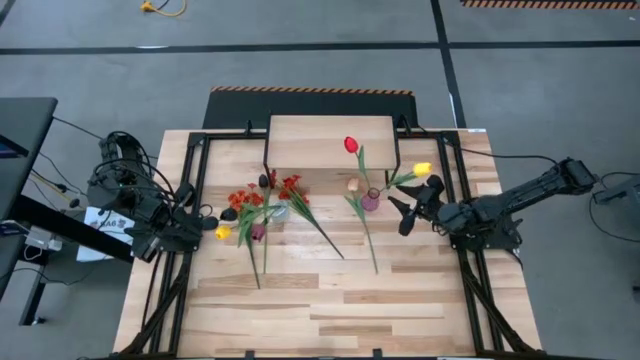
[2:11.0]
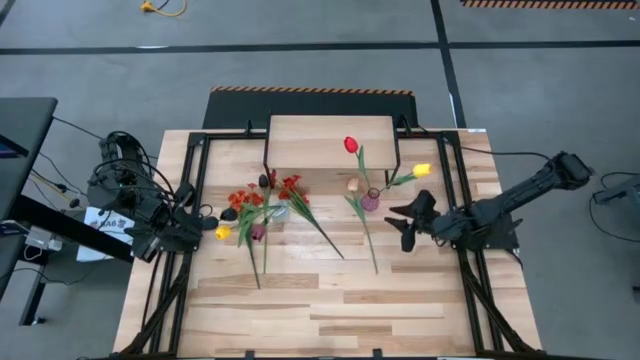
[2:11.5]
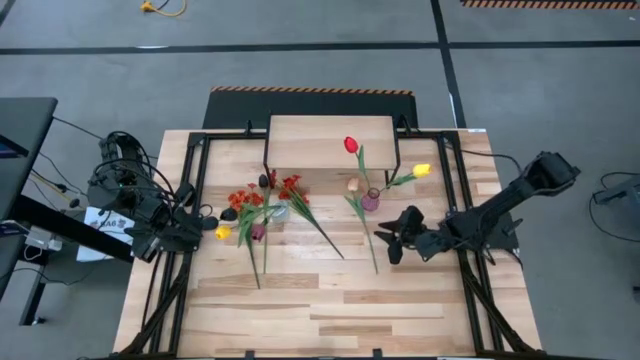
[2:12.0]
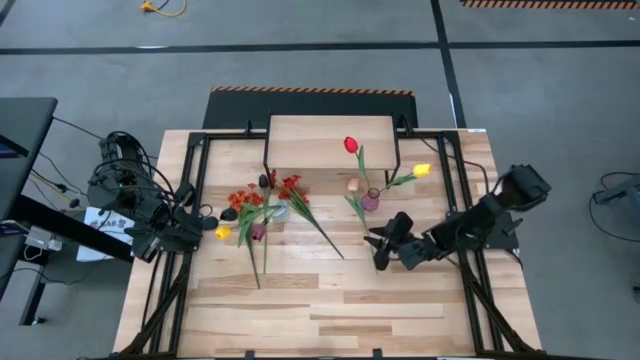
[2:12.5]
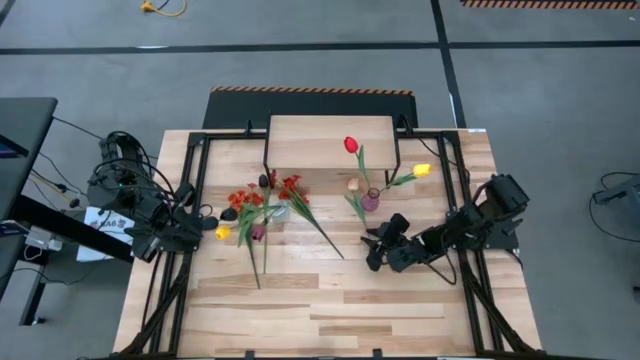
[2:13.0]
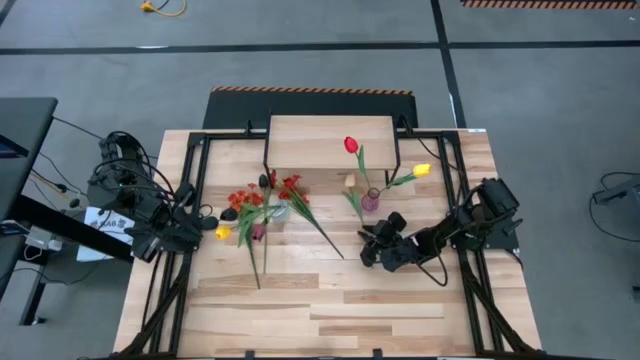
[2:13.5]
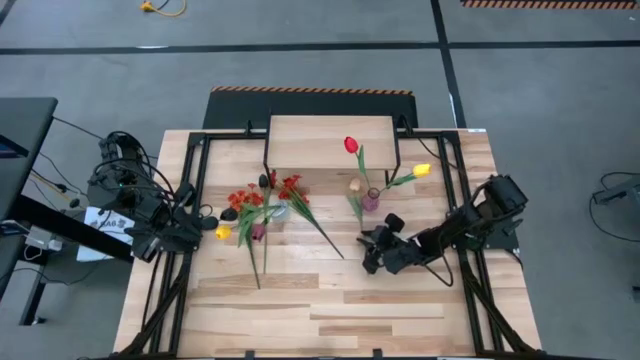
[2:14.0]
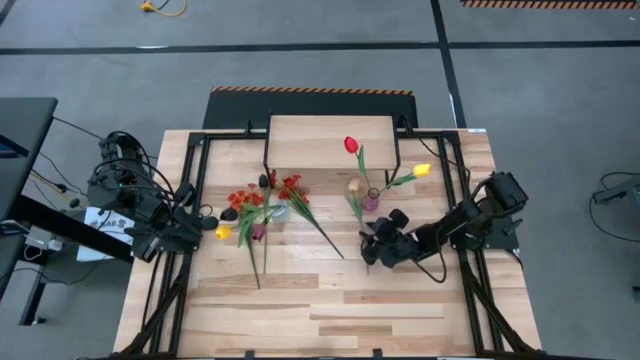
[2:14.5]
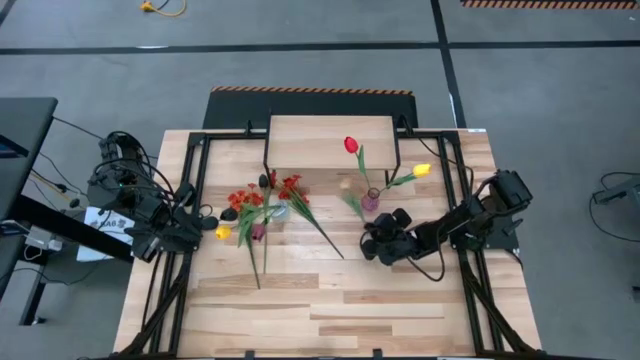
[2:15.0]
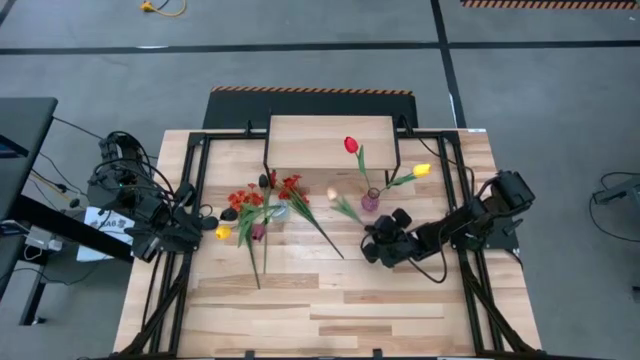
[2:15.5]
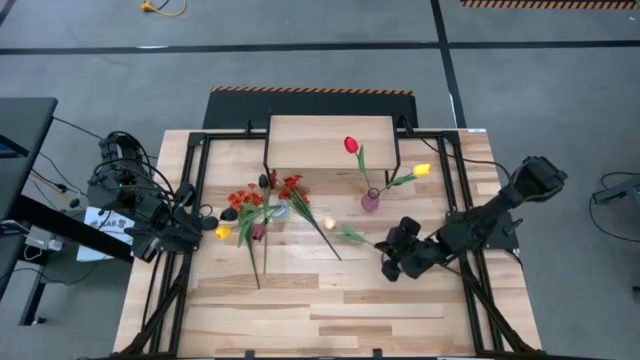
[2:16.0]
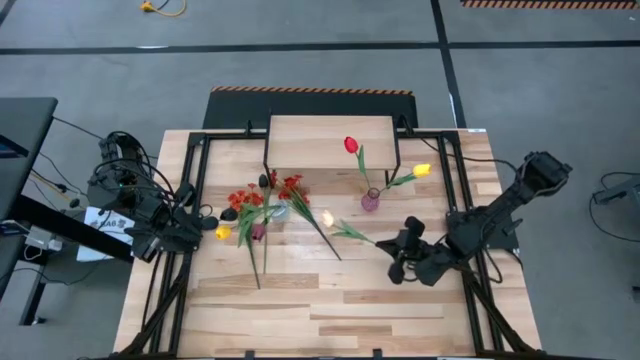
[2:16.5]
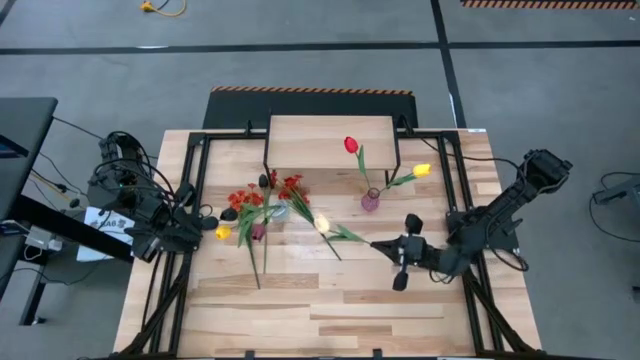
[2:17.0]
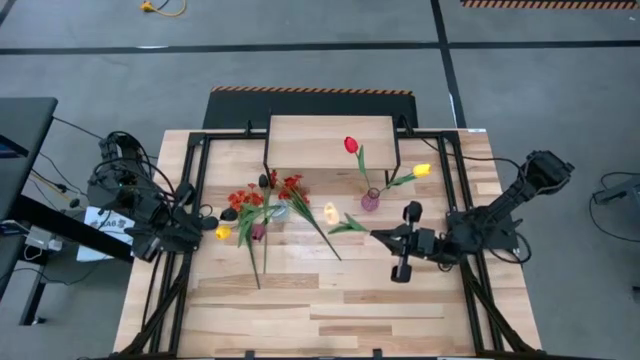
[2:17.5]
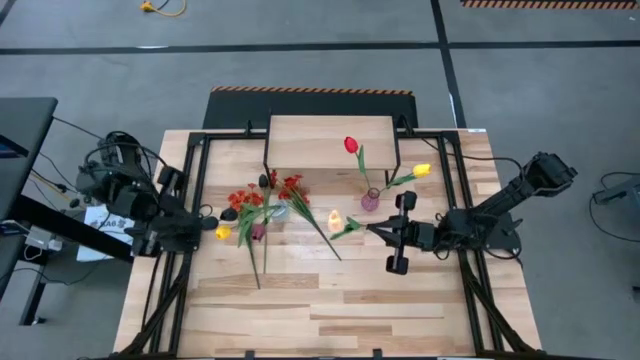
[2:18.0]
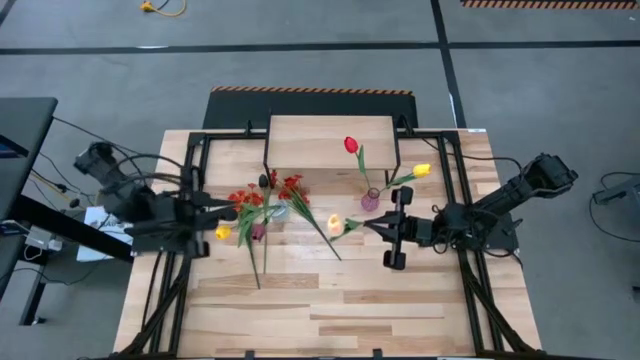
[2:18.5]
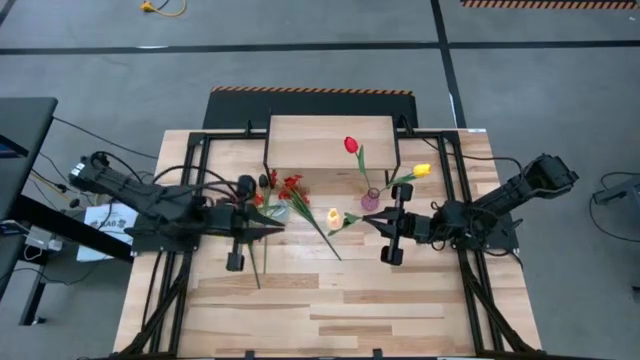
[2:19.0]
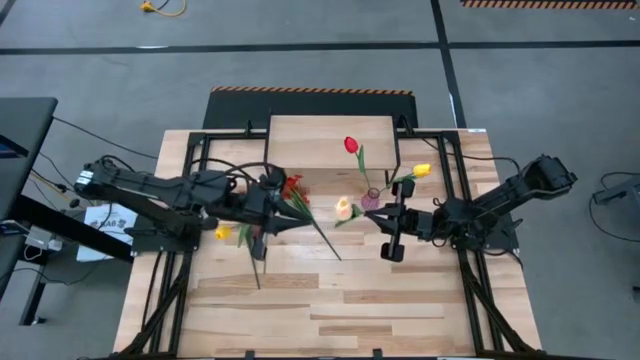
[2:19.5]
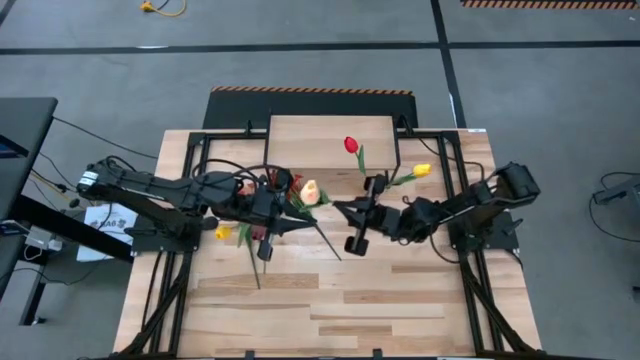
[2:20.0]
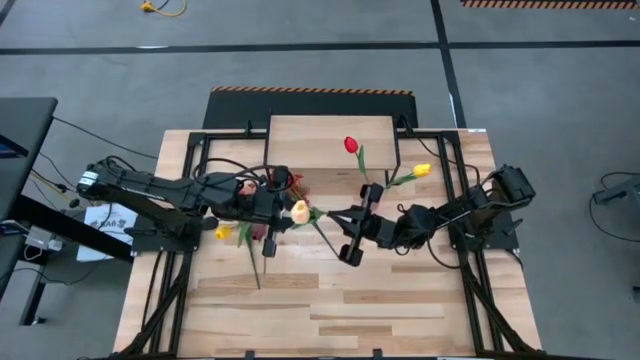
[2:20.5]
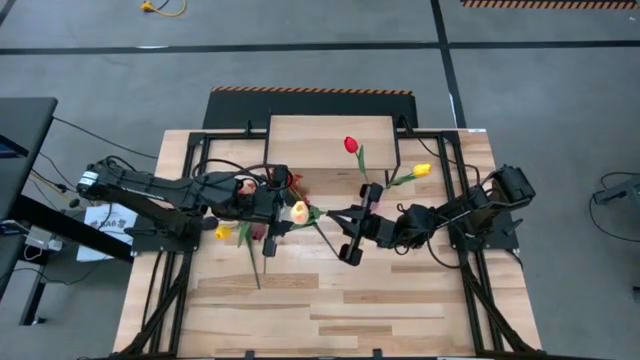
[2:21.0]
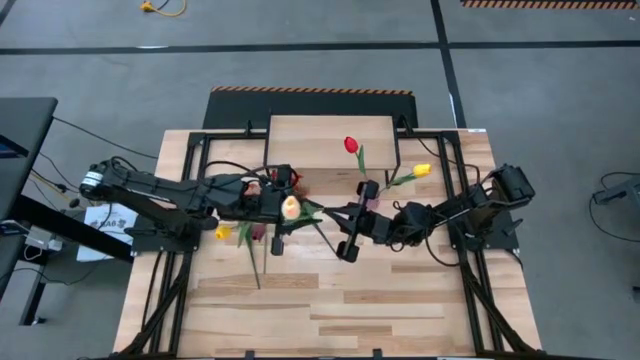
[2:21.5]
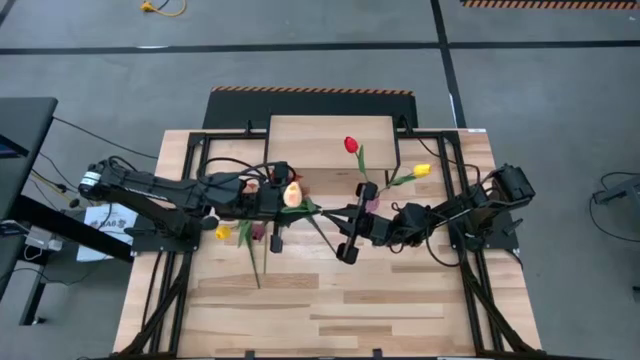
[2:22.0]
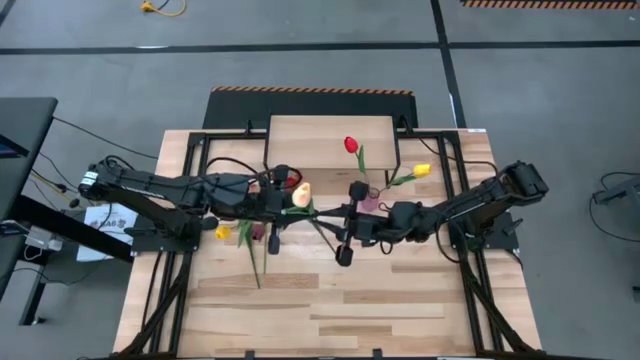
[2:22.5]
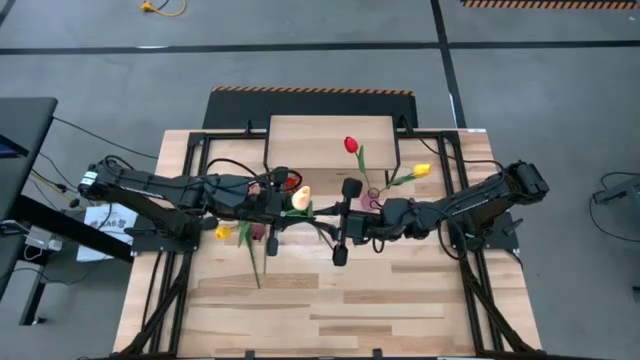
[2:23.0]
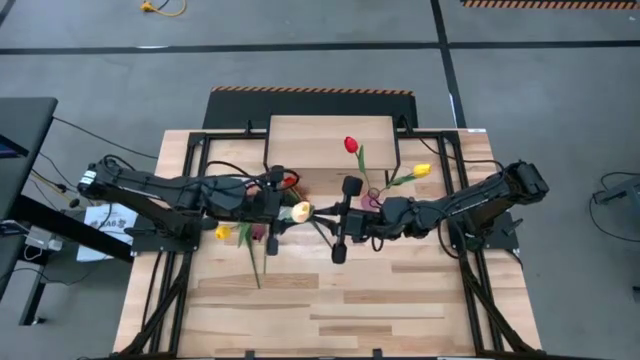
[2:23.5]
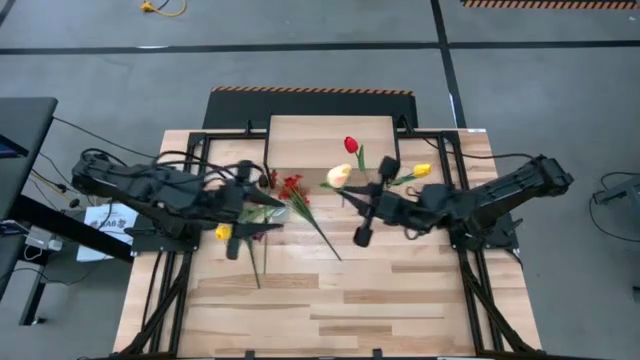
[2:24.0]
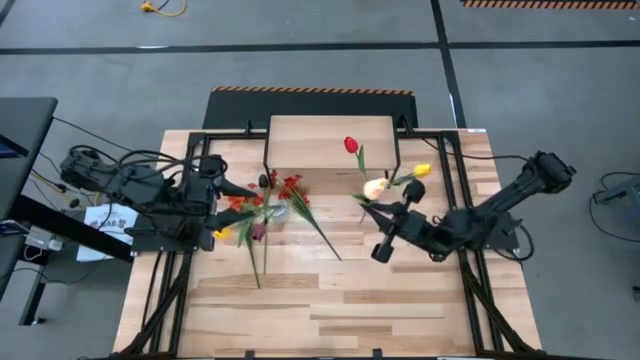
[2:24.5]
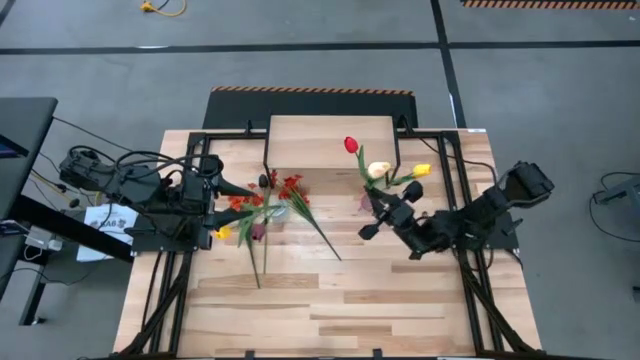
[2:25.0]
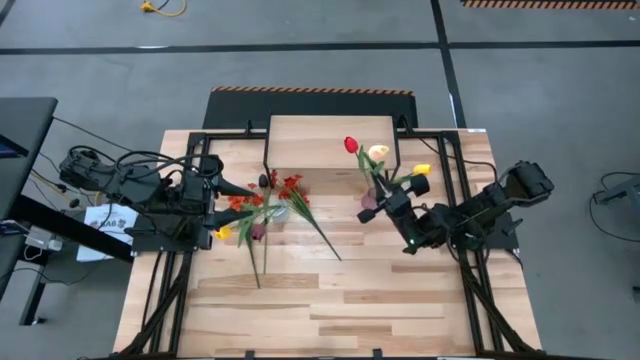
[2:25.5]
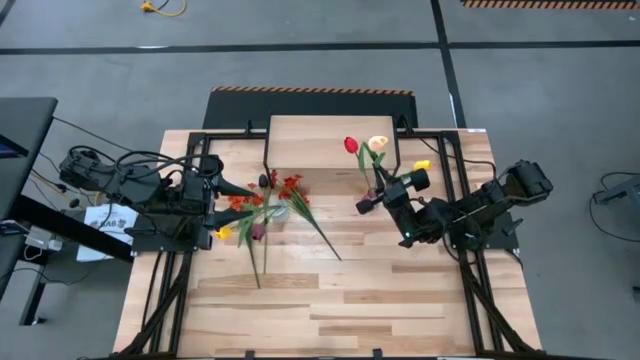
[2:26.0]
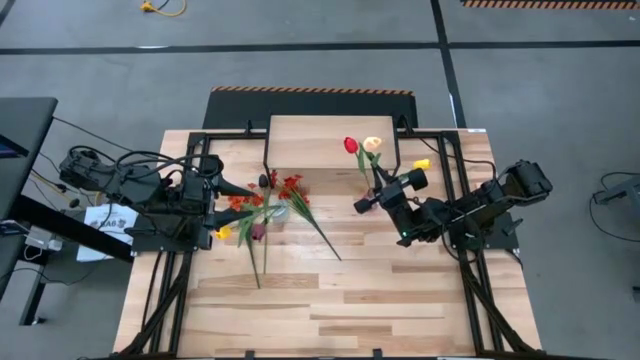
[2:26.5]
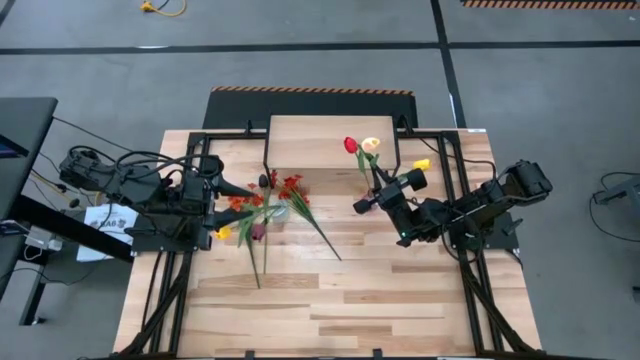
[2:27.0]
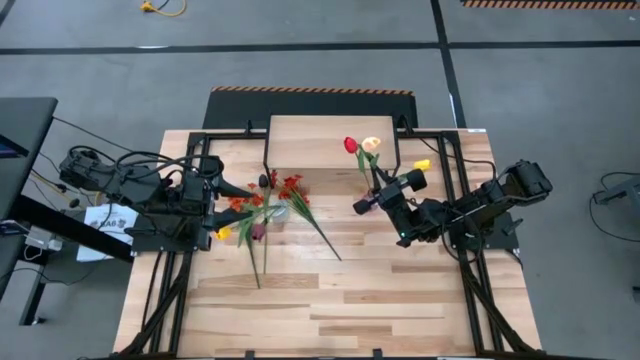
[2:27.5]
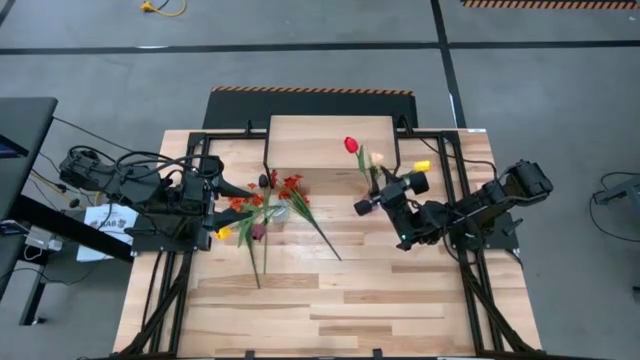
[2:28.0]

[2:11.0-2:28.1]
Task: Pick and place flowers into a vace then onto a shelf
Put the white flower into the purple vase

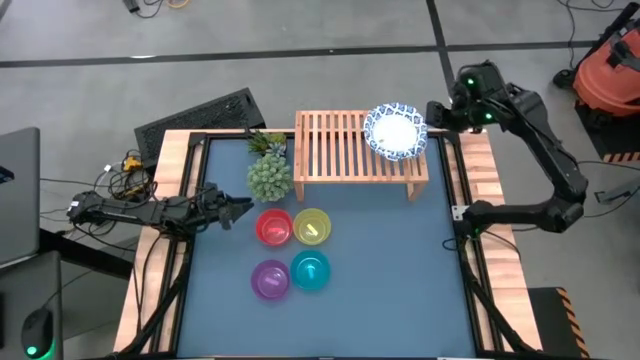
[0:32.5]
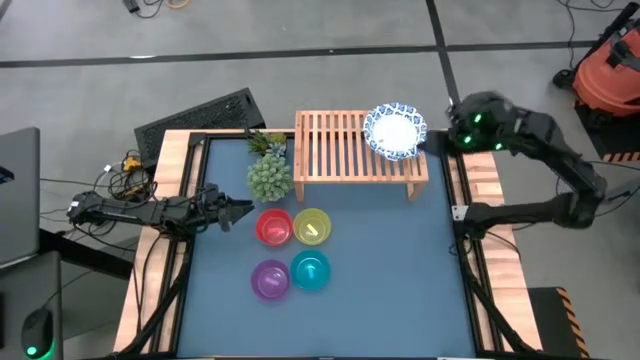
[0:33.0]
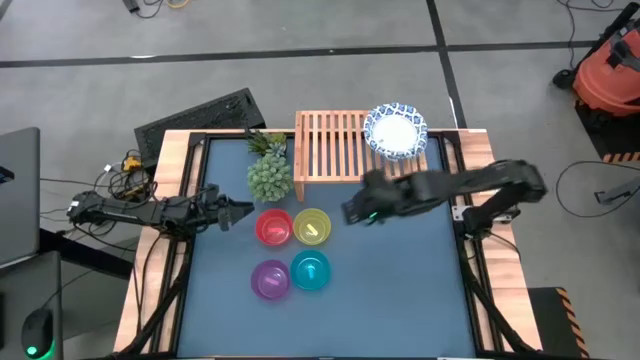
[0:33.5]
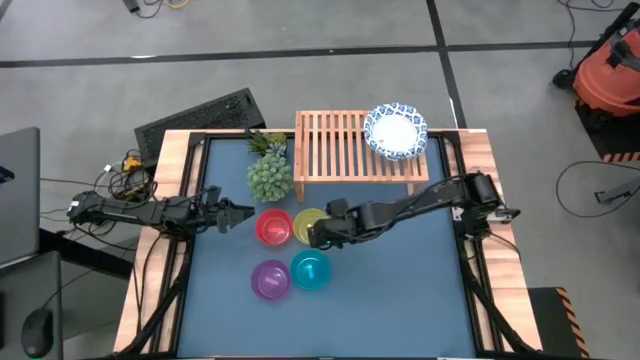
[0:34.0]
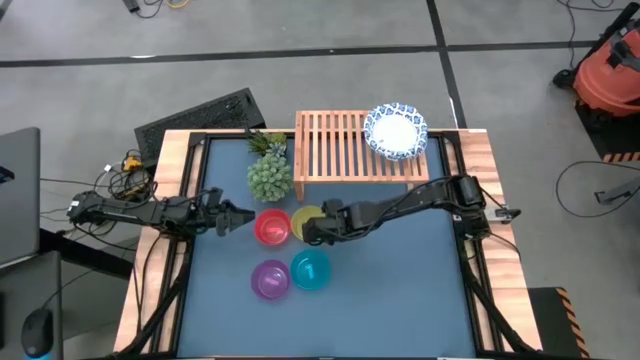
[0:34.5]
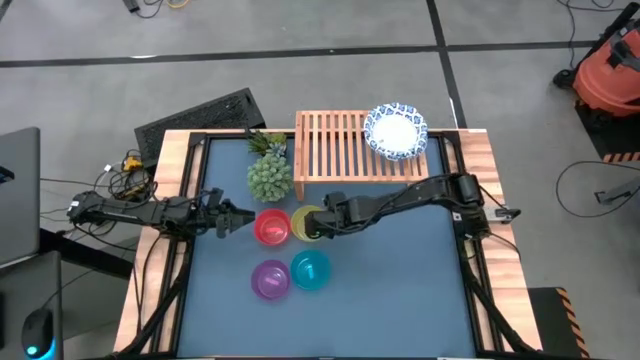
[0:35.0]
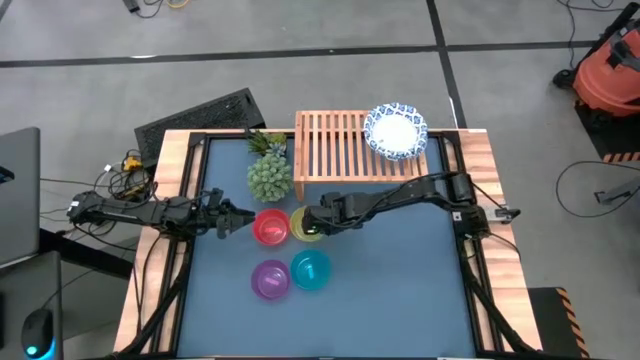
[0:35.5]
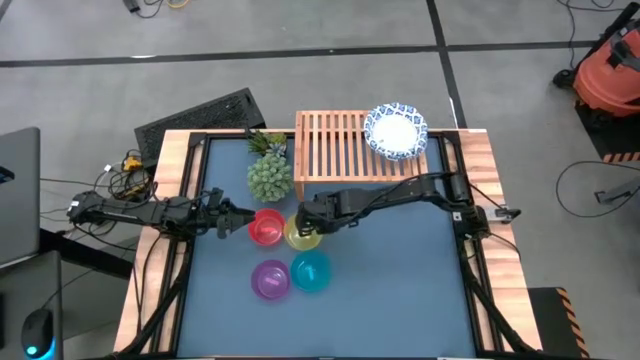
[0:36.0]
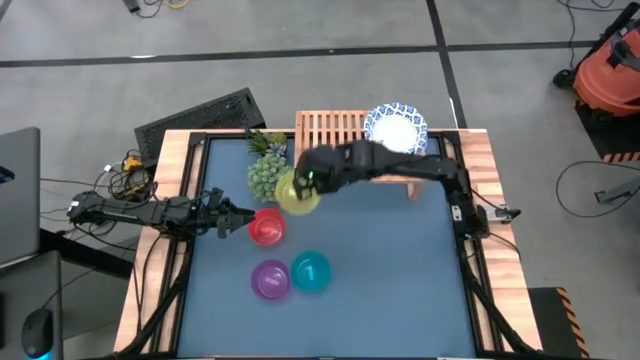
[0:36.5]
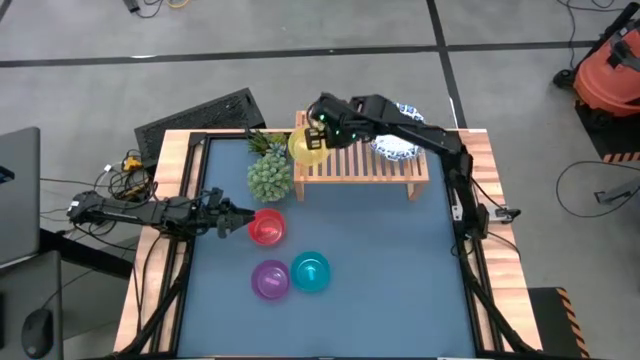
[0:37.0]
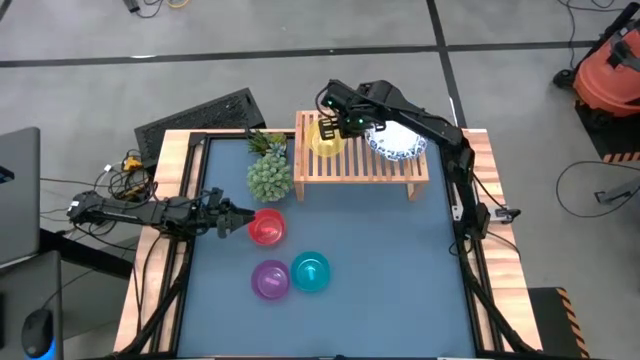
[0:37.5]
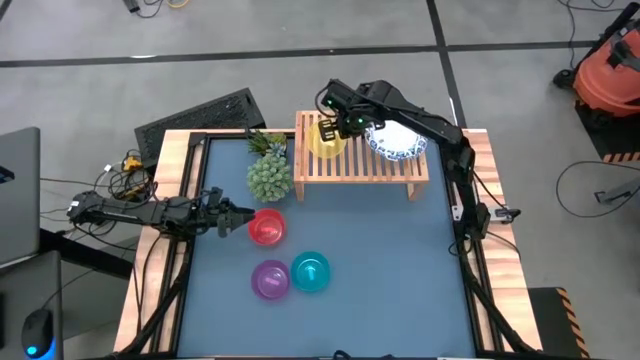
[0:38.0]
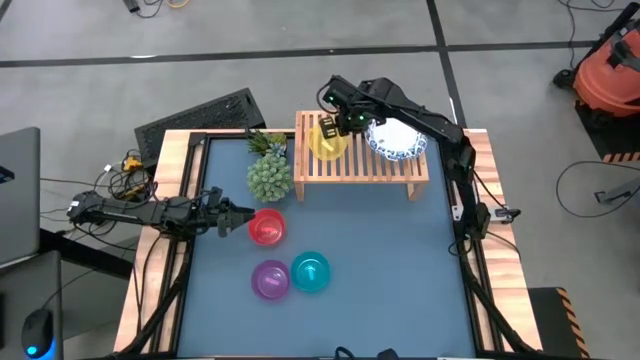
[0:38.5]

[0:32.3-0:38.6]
Task: Place and stack bowls onto a shelf
Put the yellow bowl on the shelf
